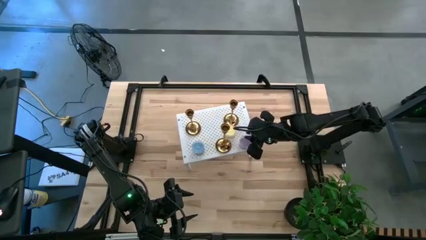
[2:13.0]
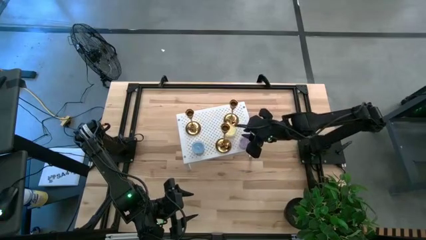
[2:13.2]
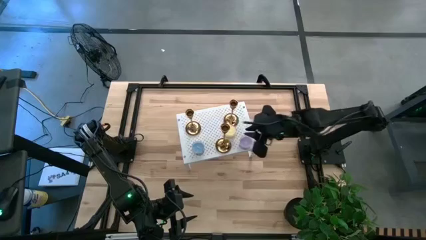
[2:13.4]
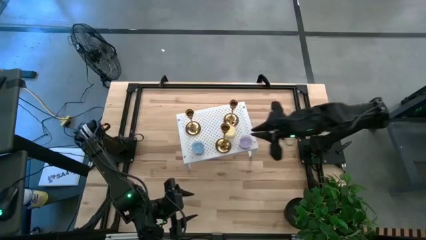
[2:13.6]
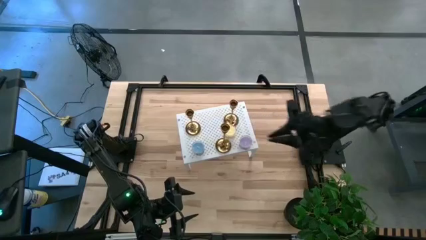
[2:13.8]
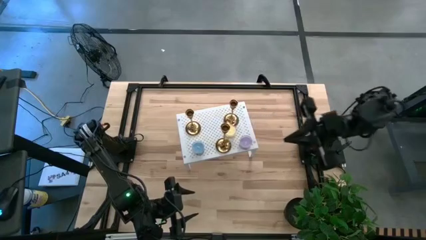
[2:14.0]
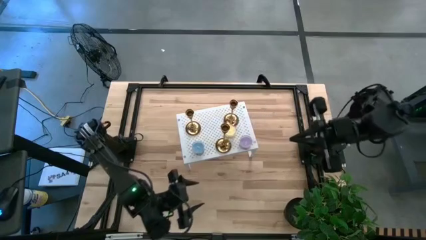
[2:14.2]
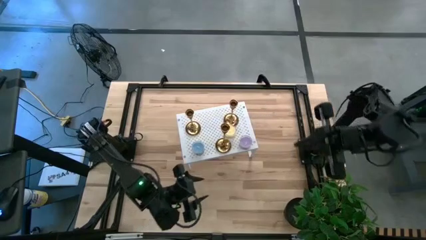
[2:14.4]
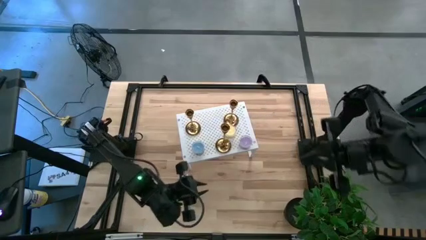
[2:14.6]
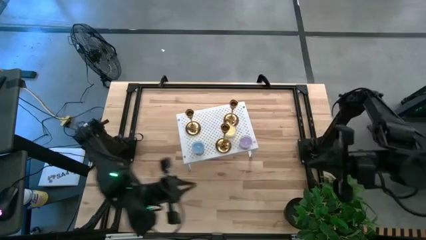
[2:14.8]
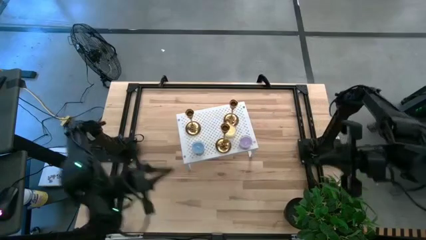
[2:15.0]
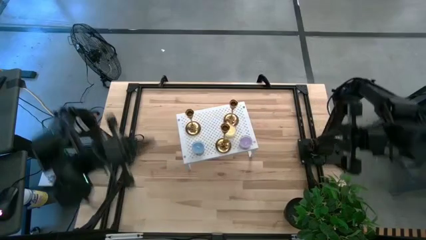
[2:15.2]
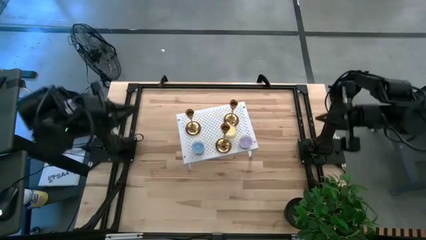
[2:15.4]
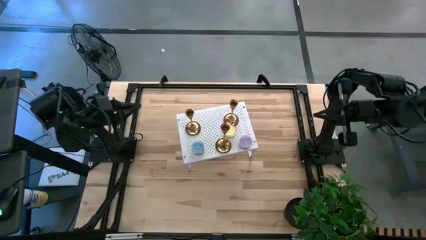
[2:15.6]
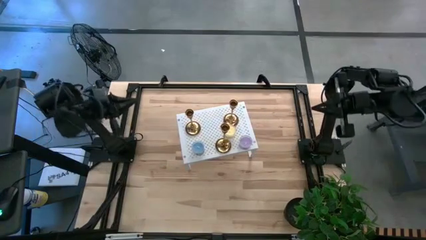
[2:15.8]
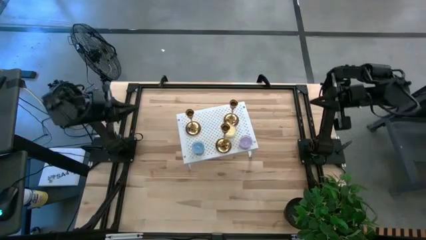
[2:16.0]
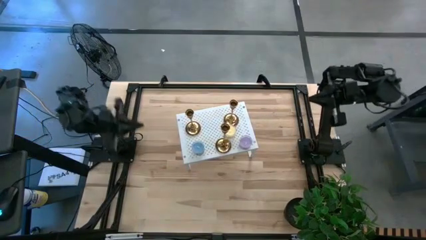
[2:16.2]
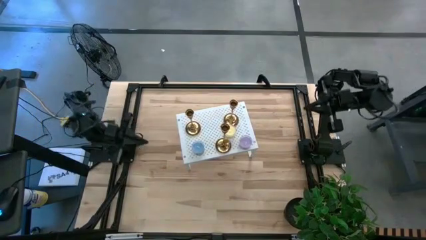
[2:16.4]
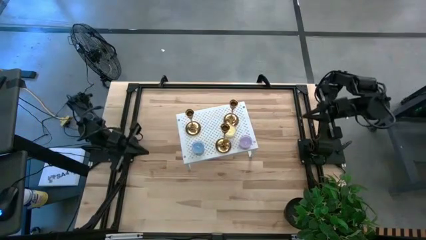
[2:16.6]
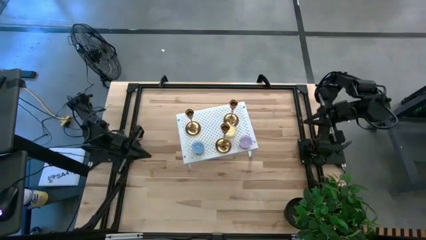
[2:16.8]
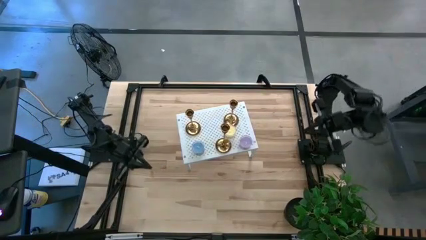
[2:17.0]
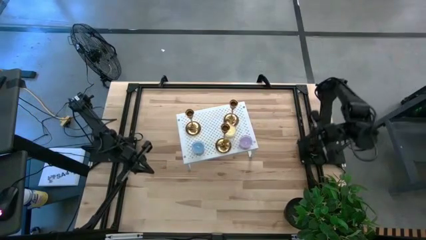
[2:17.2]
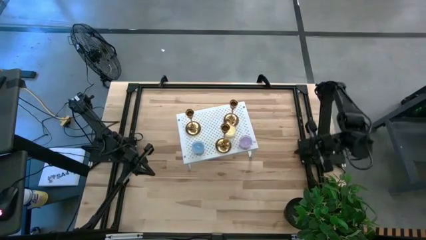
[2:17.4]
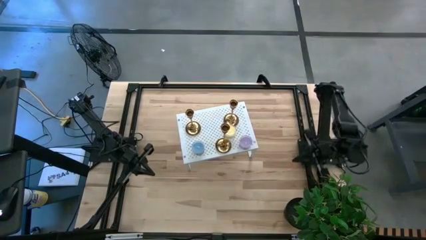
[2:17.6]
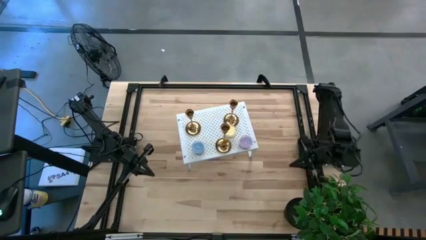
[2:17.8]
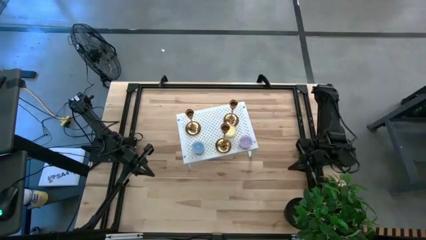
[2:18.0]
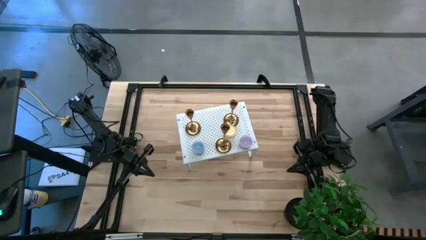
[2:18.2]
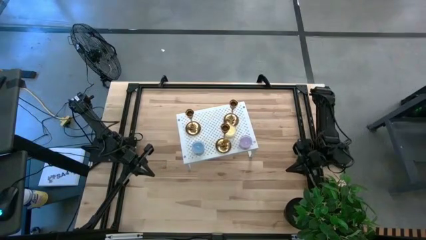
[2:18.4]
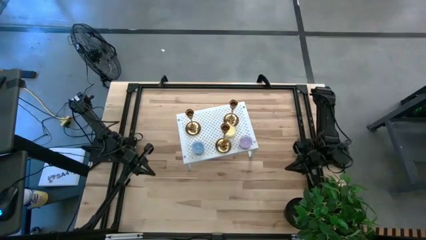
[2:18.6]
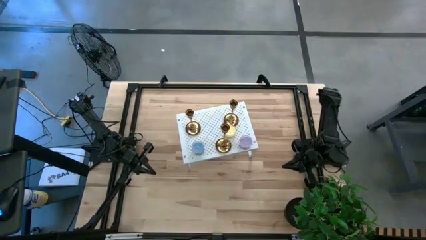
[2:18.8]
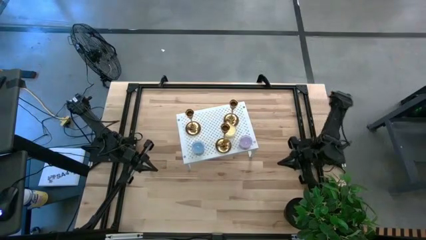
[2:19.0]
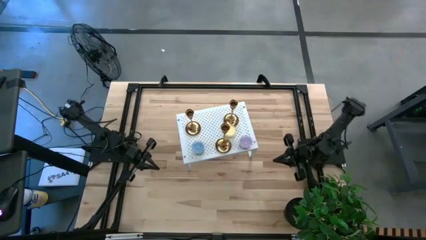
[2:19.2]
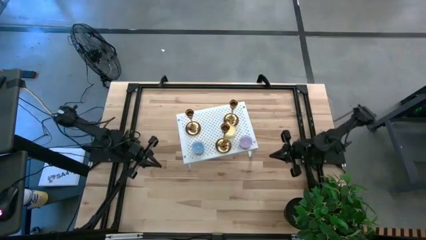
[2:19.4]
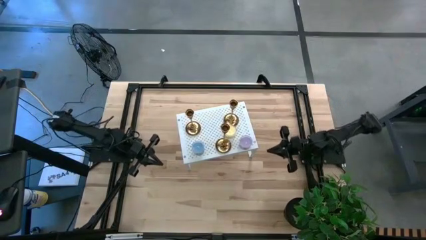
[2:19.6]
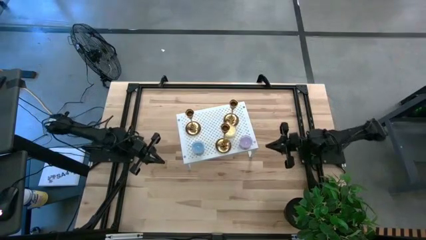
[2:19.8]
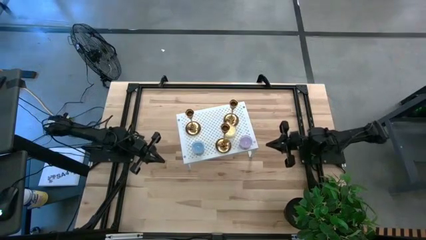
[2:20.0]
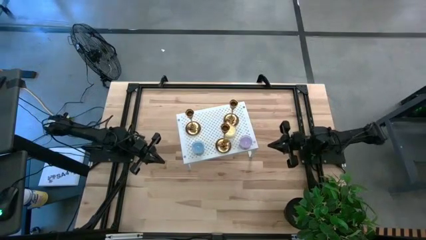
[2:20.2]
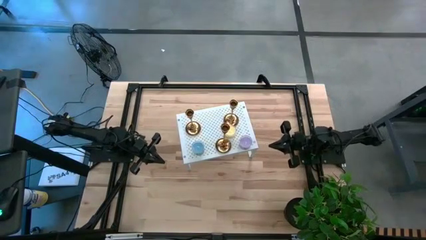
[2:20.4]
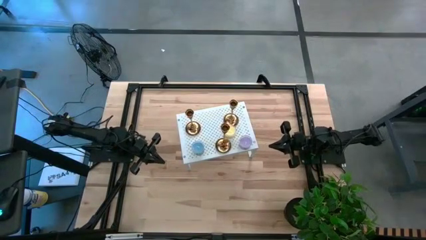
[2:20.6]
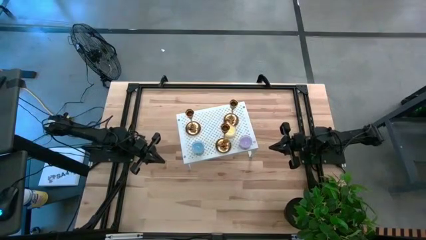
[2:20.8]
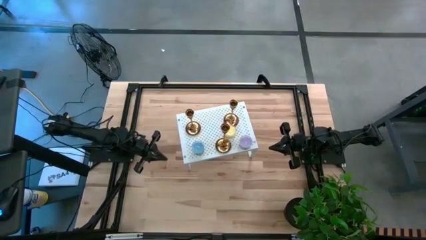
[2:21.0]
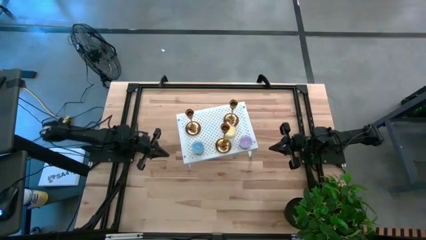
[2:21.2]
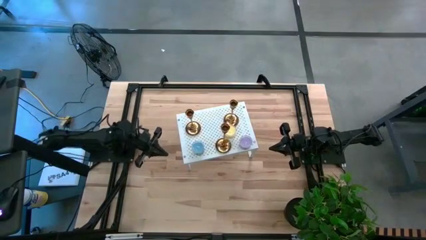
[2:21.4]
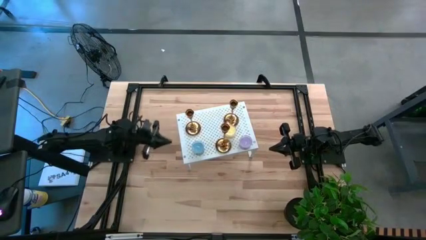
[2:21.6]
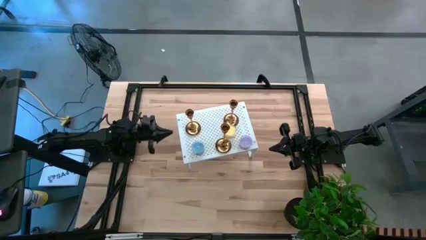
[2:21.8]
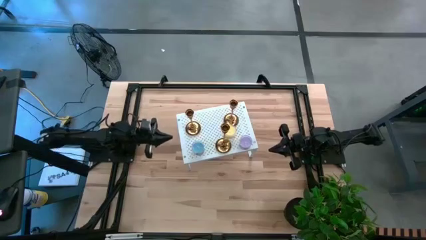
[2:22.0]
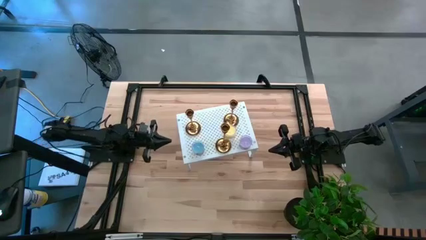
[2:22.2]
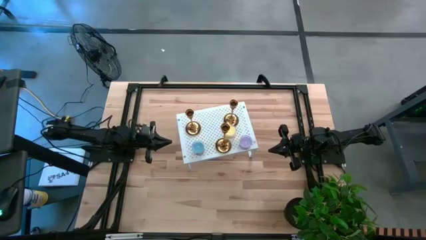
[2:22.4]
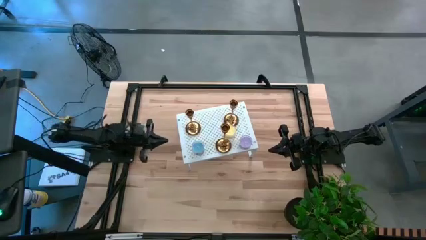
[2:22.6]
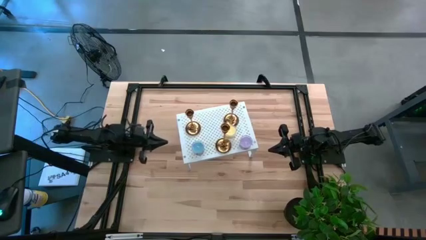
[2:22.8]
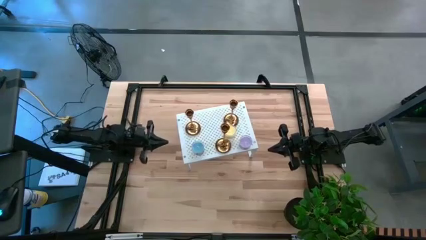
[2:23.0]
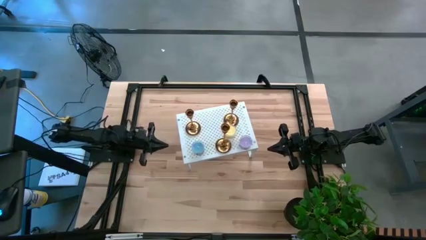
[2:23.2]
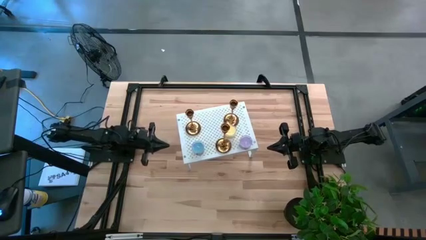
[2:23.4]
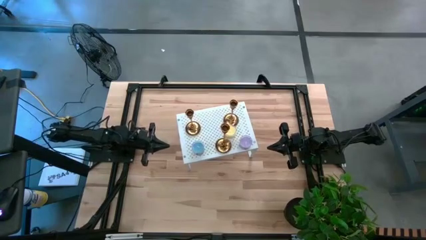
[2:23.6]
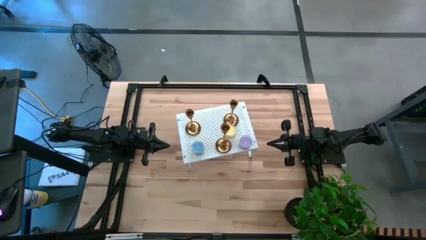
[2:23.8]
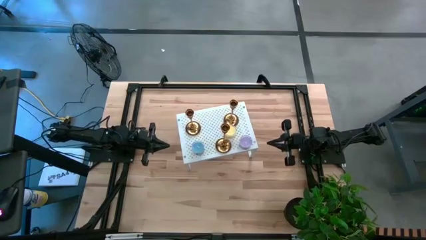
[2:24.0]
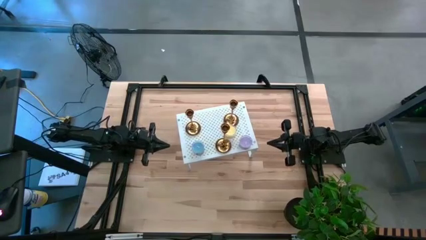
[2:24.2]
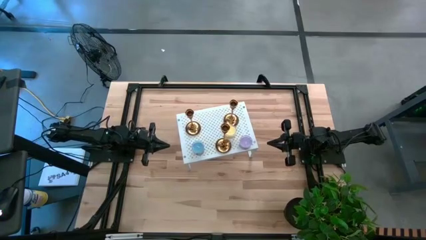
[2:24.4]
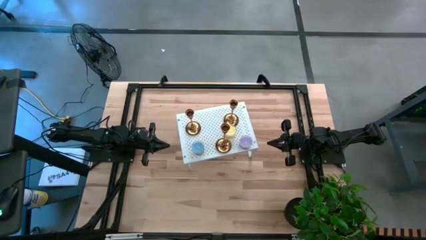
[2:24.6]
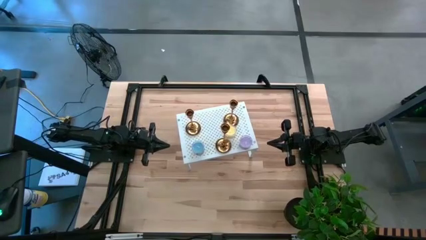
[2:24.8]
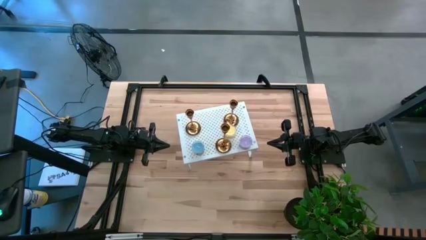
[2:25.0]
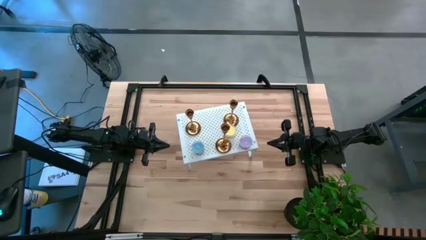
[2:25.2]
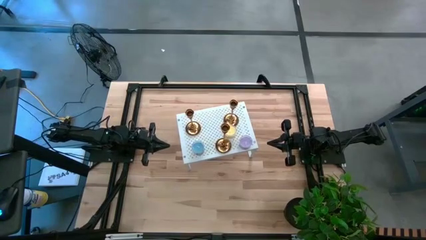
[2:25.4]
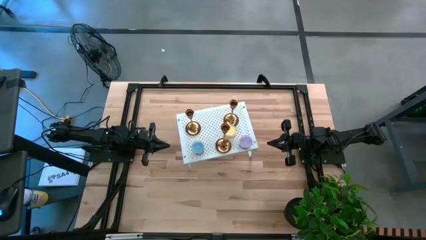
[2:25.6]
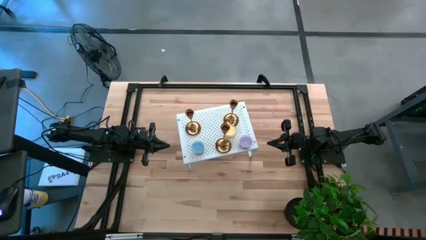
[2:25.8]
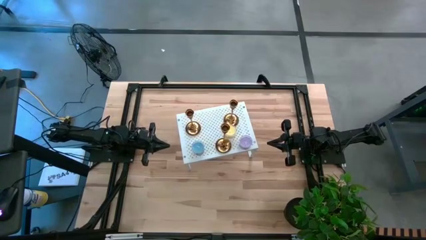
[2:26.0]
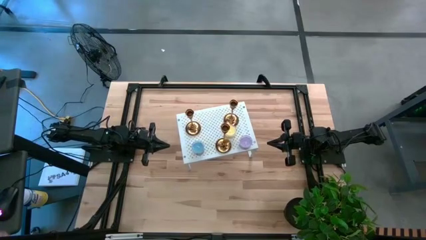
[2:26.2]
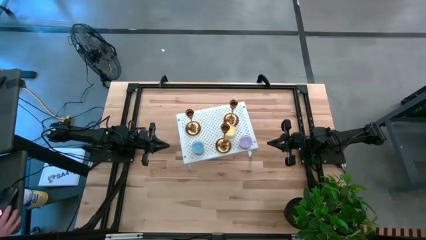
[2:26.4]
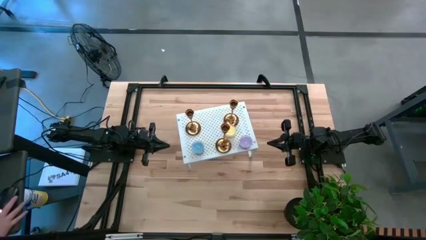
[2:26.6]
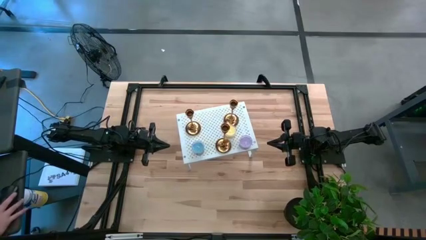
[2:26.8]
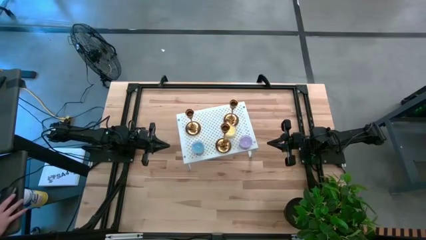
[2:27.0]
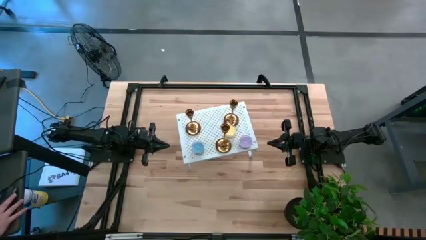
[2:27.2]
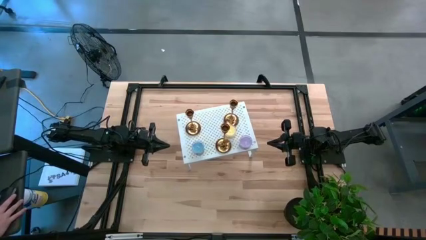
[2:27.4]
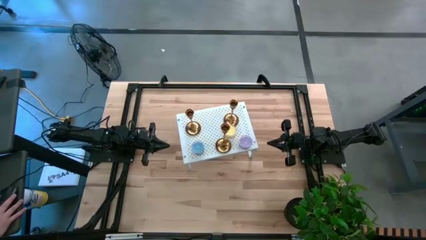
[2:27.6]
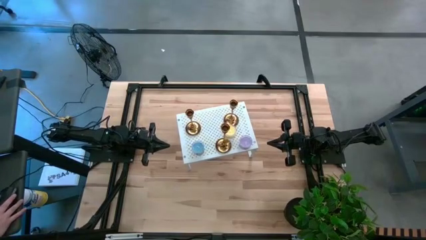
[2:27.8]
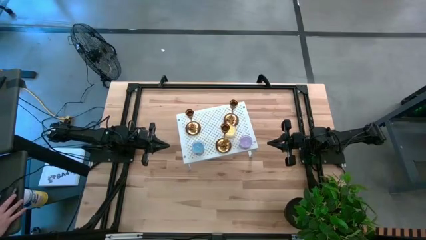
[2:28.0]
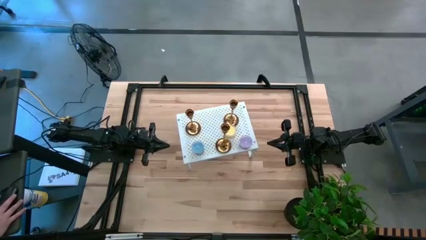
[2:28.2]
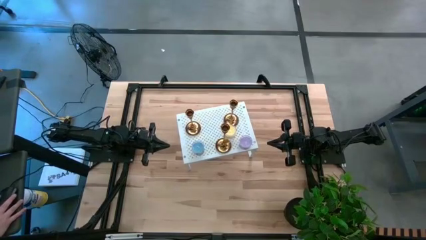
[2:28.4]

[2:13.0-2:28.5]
Task: Pick & Place candle stick holders
Return to Home Position
